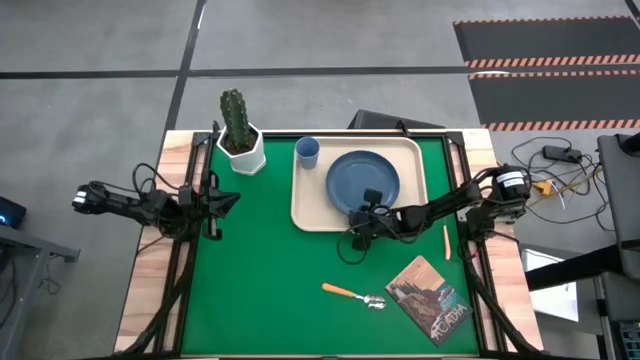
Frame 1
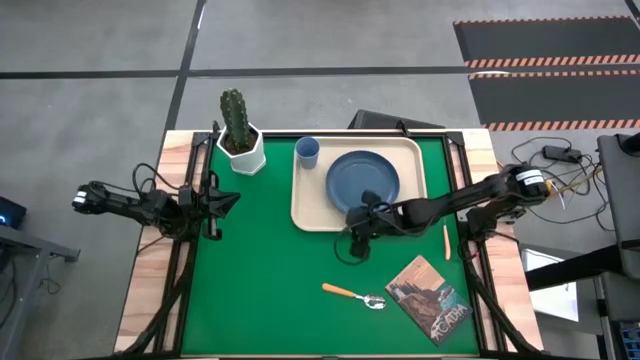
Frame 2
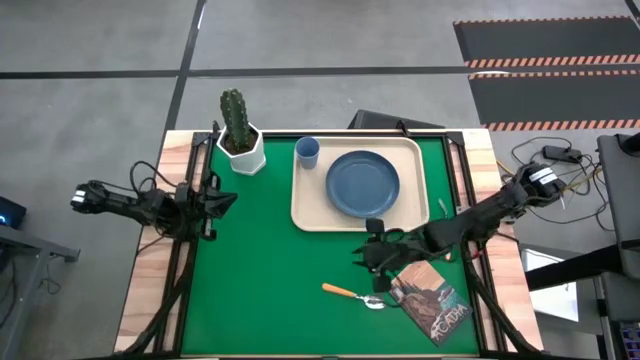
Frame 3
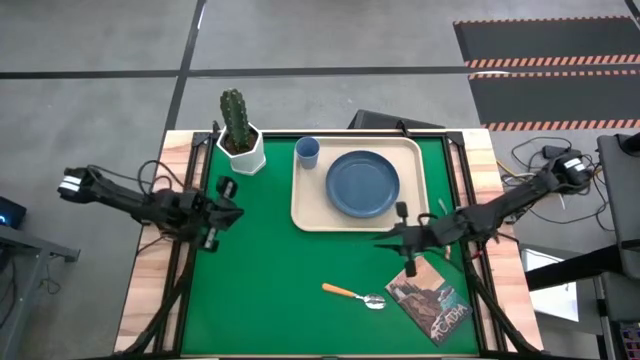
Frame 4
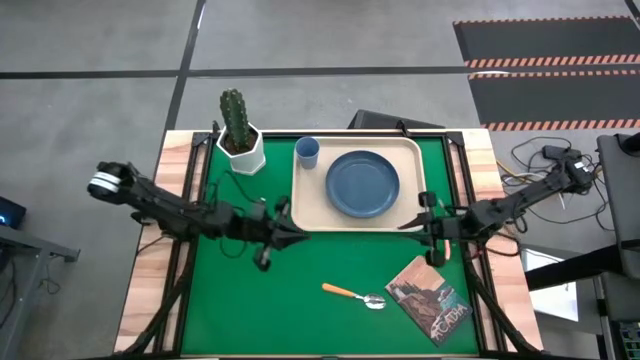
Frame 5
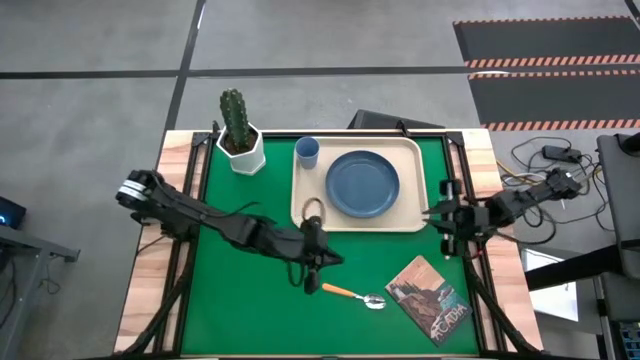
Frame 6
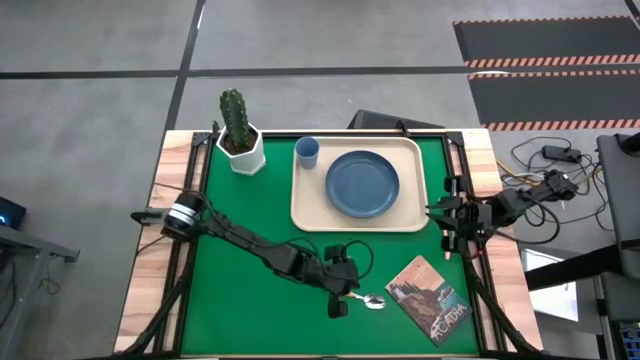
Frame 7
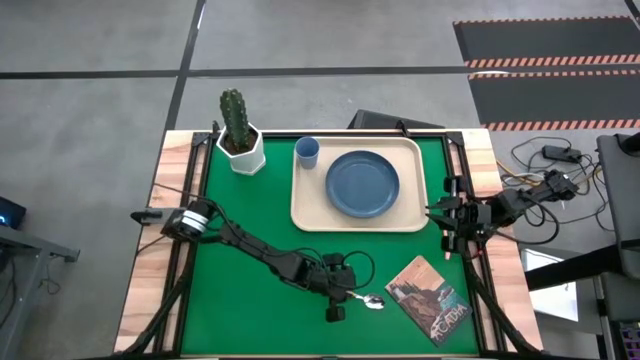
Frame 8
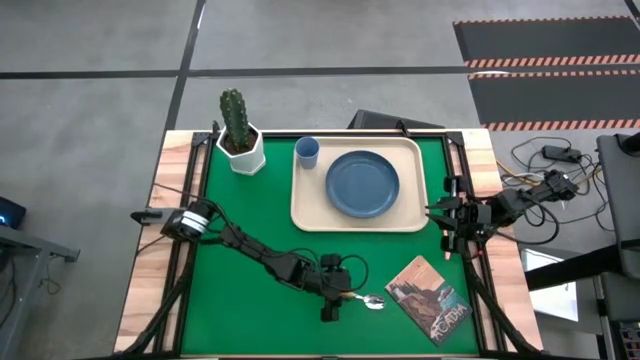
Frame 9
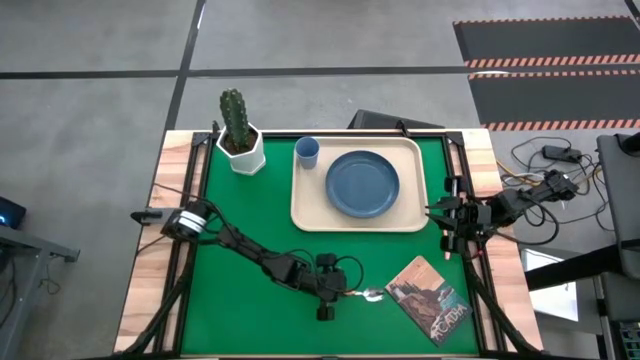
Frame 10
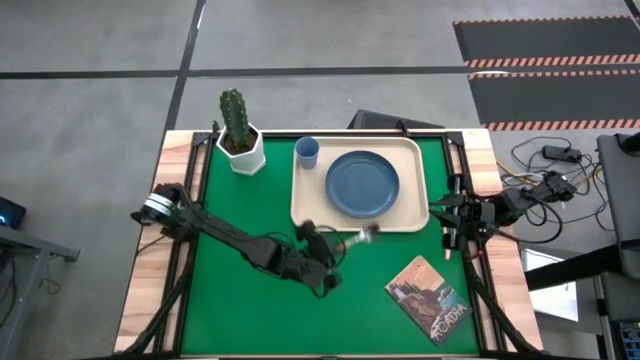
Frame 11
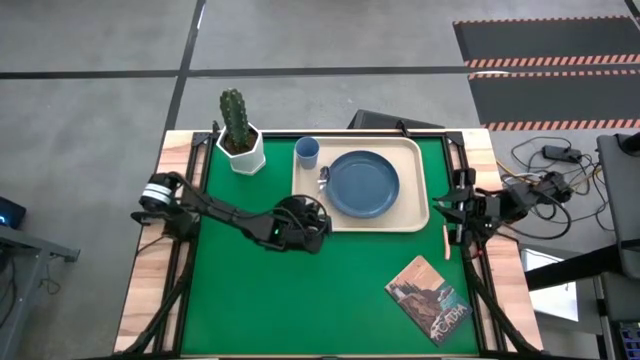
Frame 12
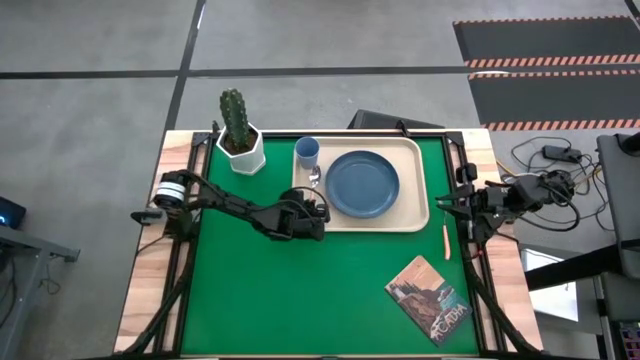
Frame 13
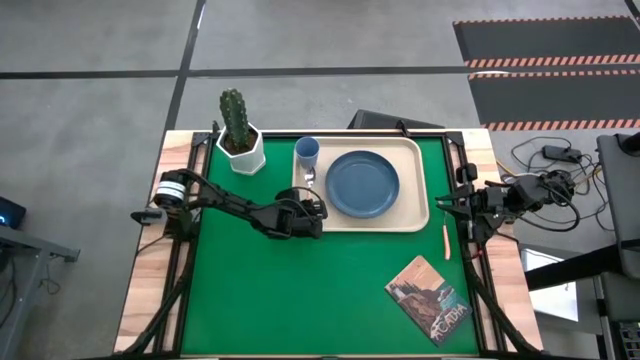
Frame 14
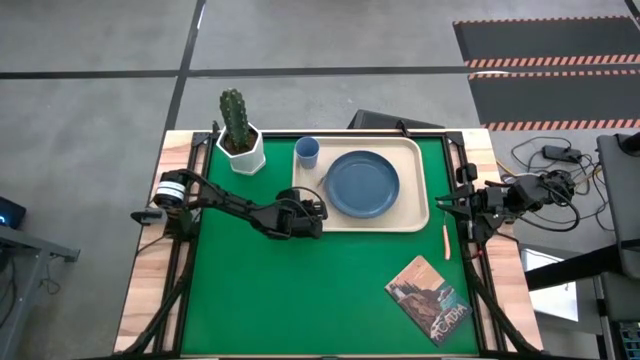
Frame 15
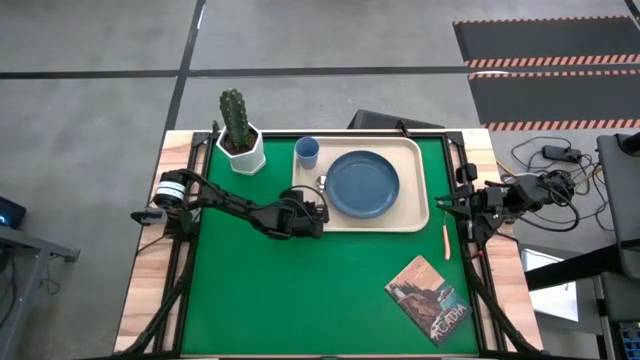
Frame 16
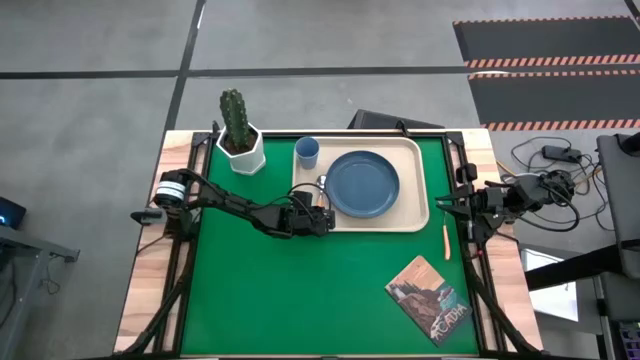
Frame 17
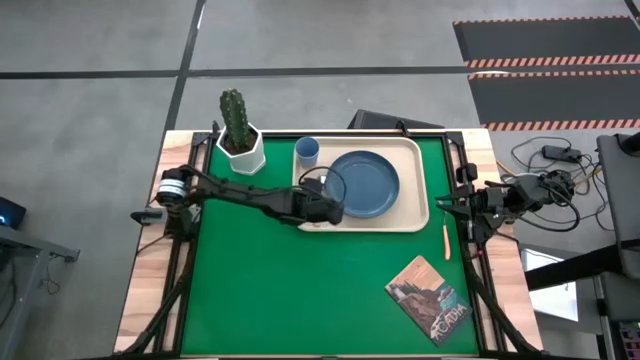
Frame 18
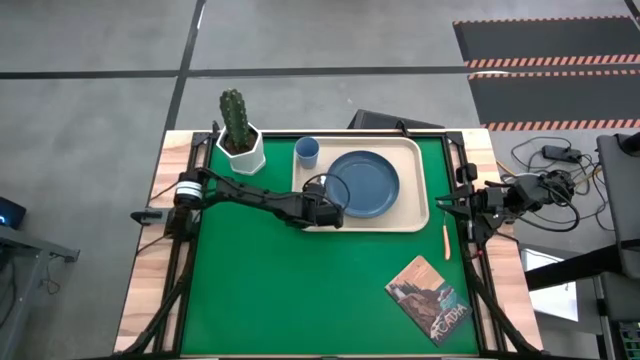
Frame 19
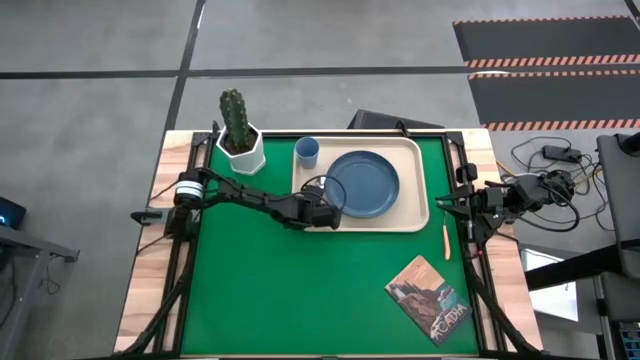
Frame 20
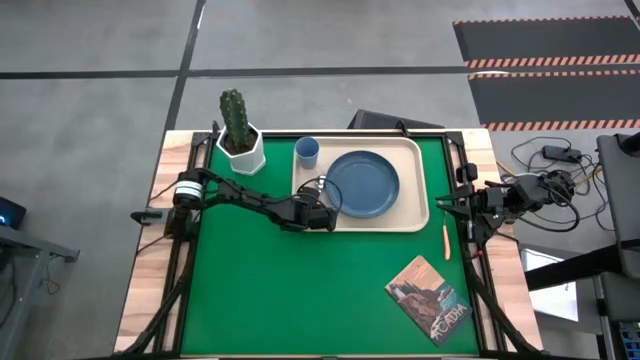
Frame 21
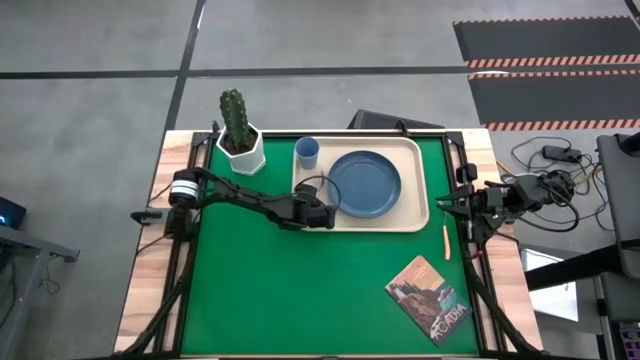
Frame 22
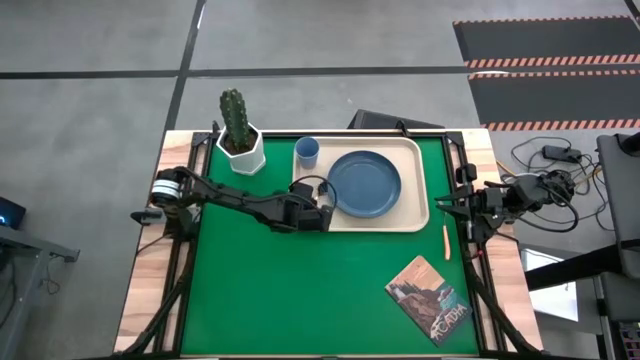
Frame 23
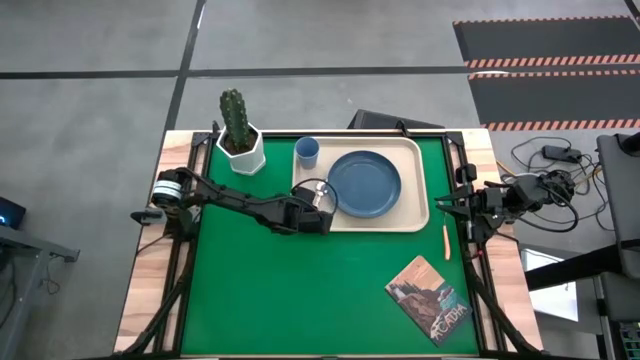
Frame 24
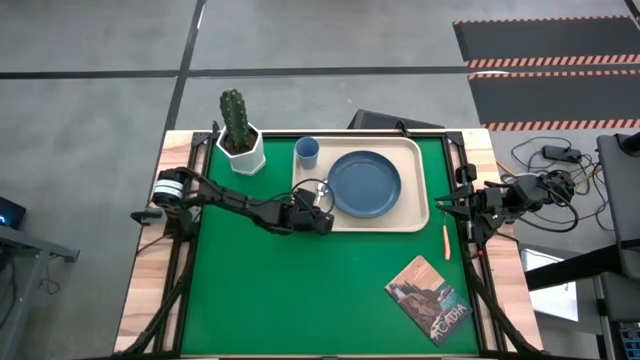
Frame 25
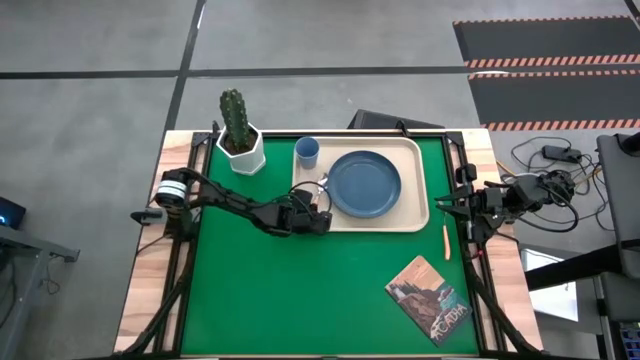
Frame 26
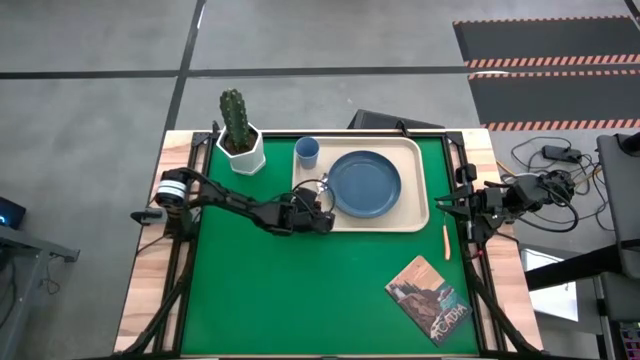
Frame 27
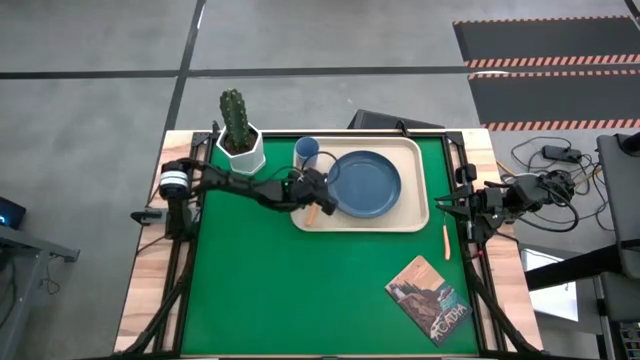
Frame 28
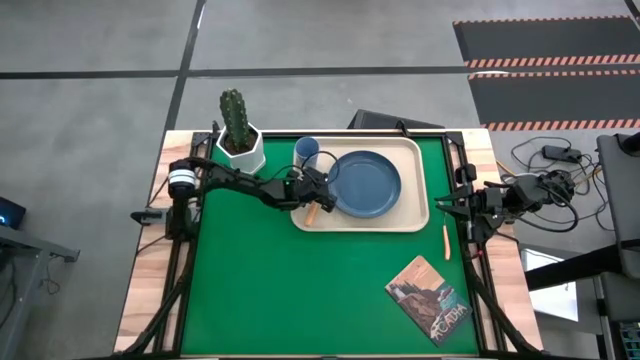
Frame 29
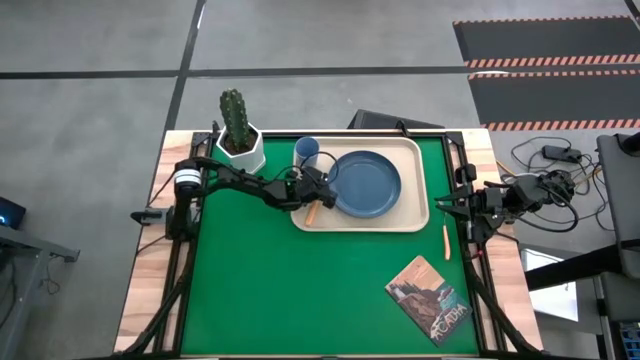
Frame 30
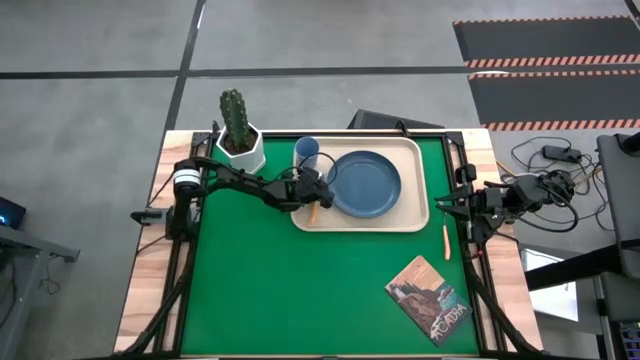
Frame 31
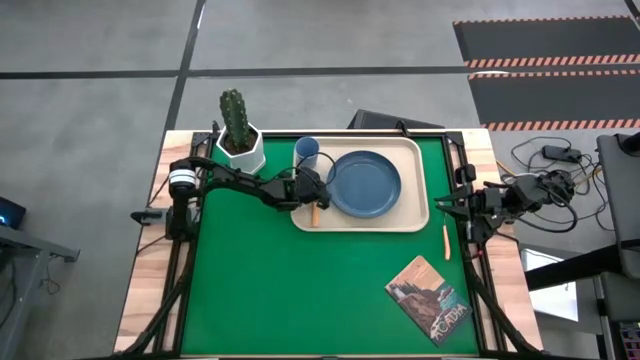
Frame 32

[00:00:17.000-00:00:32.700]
Task: Pick and place plate/cup/fork/spoon on tray
Put the yellow spoon on the white serving tray to the left of the blue plate

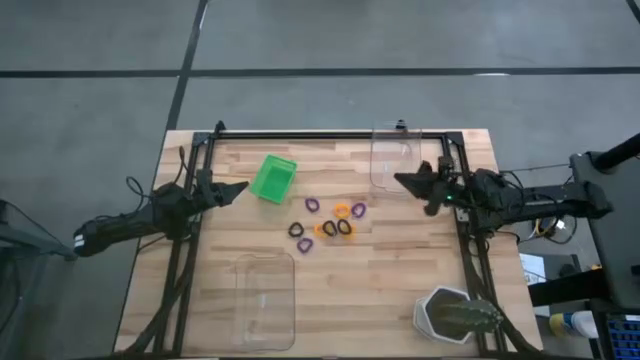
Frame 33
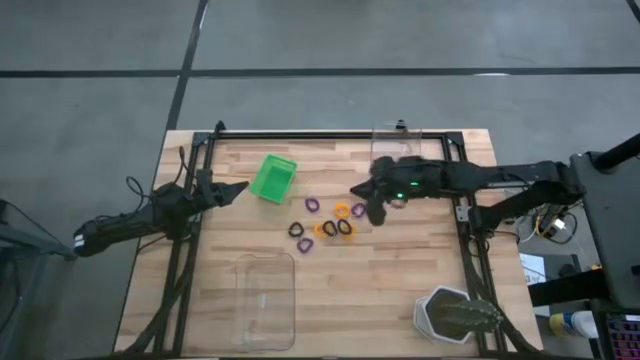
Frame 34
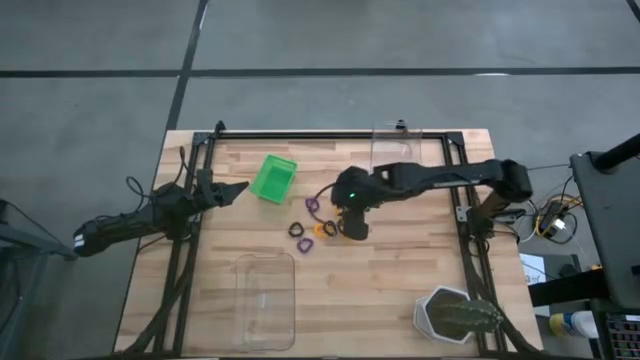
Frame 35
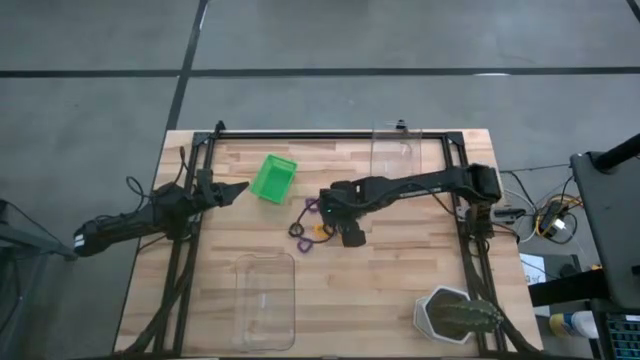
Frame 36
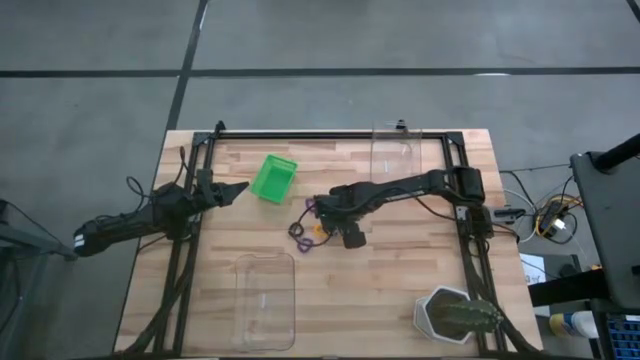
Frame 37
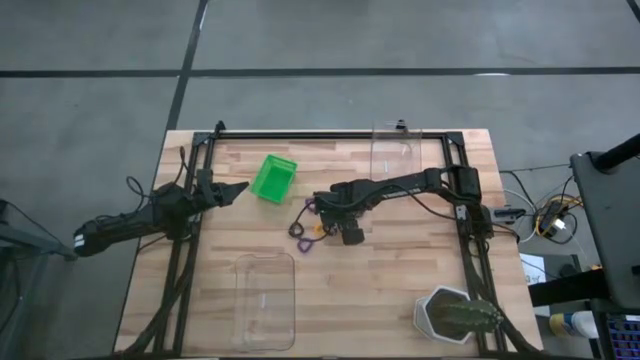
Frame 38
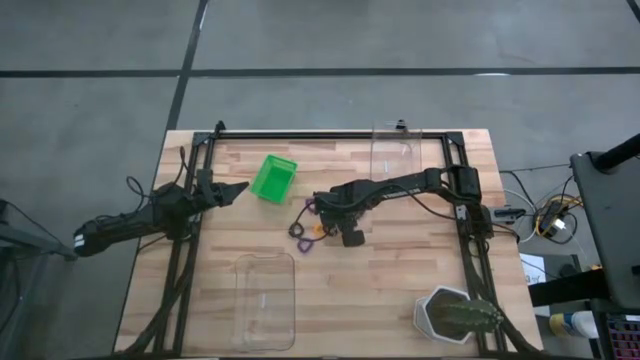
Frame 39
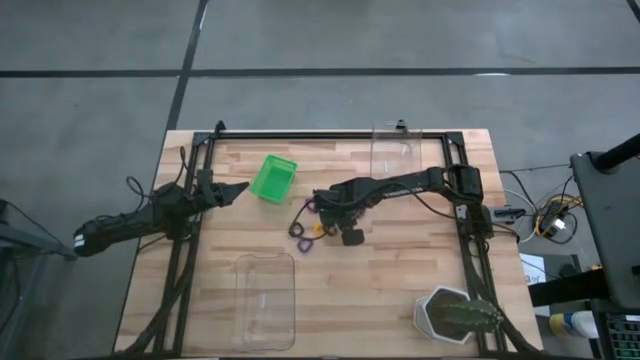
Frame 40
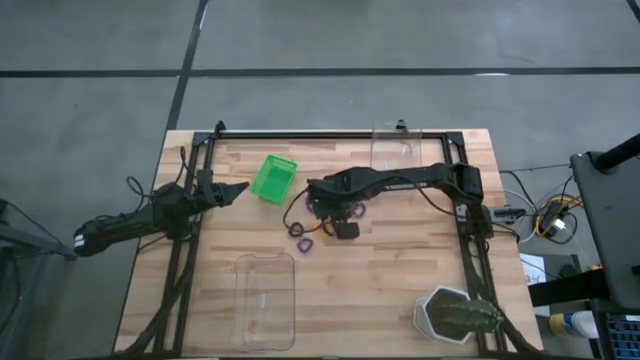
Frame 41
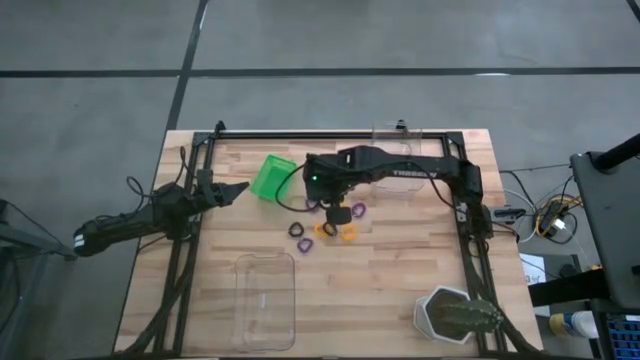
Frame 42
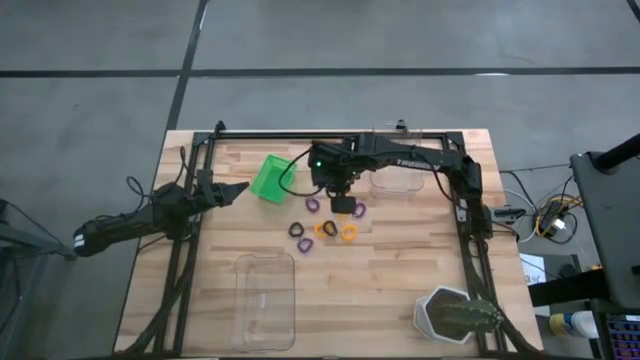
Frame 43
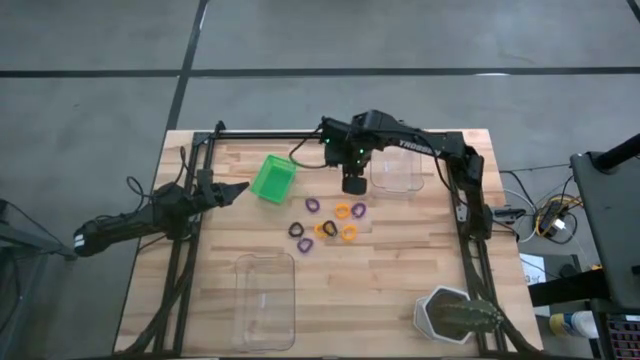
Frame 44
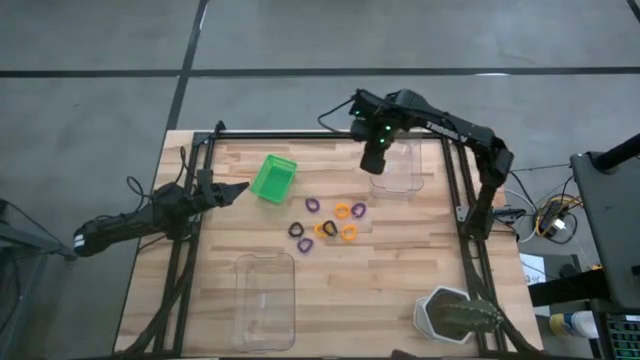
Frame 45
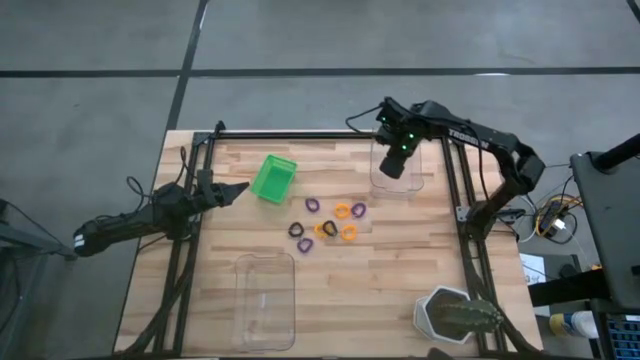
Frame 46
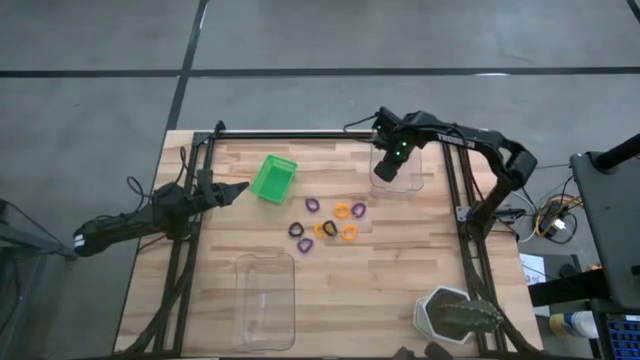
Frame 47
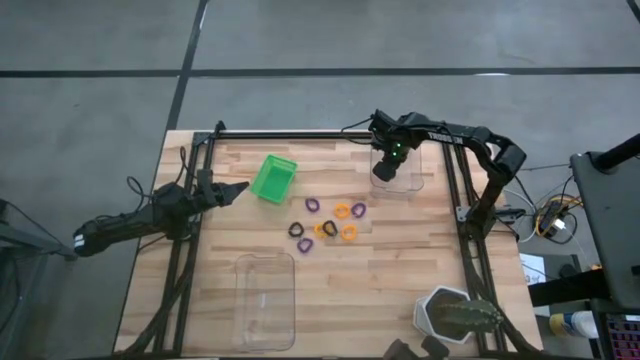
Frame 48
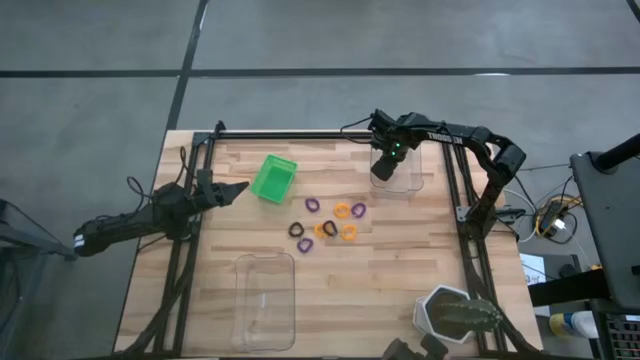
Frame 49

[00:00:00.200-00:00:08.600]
Task: Sort spring keychains
Put the right black spring keychain into the top transparent bin
